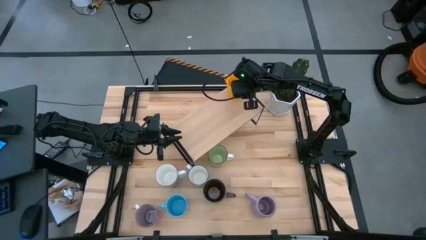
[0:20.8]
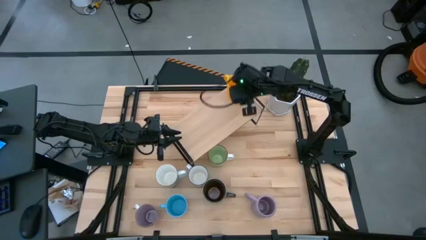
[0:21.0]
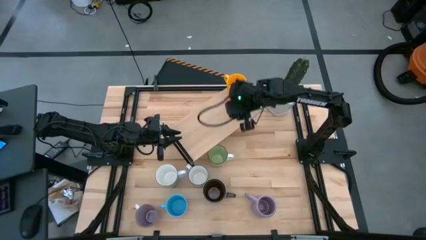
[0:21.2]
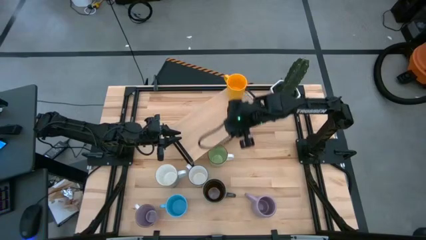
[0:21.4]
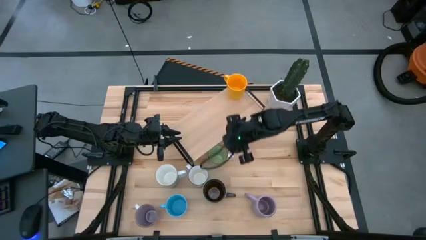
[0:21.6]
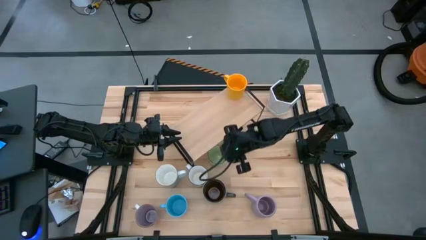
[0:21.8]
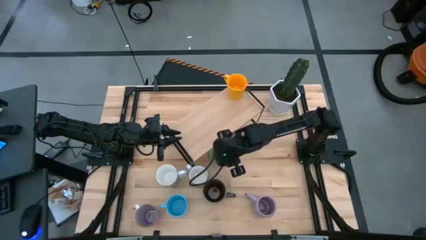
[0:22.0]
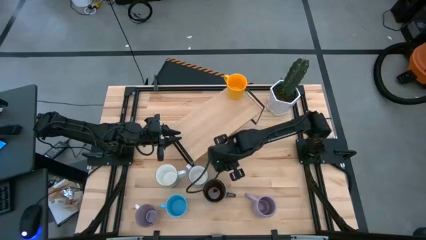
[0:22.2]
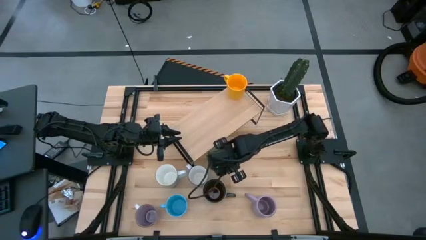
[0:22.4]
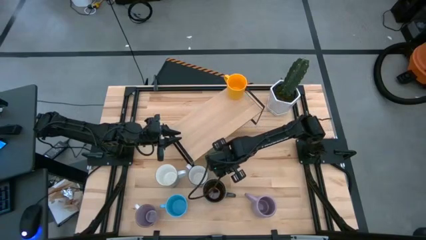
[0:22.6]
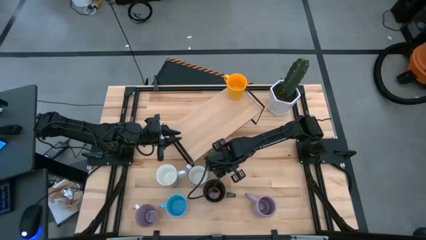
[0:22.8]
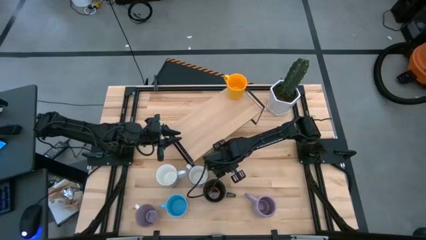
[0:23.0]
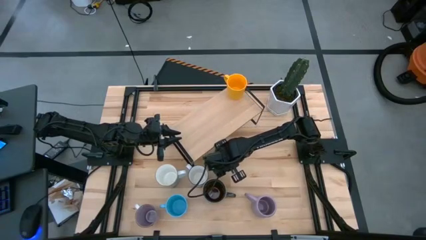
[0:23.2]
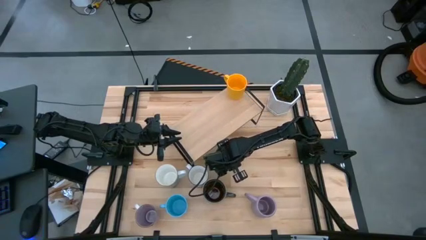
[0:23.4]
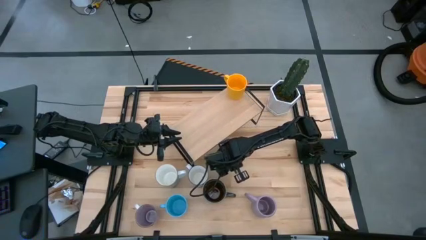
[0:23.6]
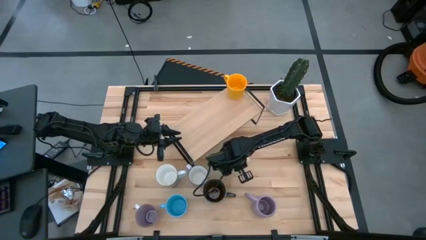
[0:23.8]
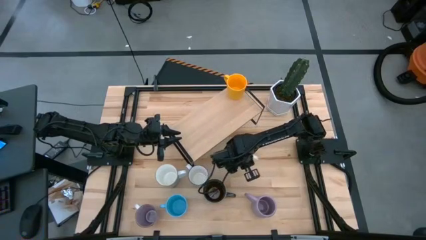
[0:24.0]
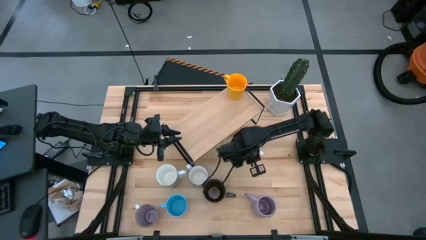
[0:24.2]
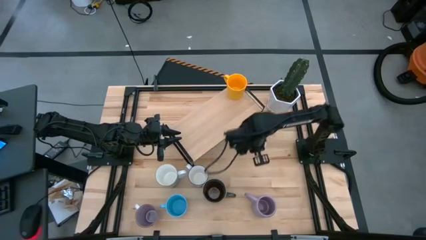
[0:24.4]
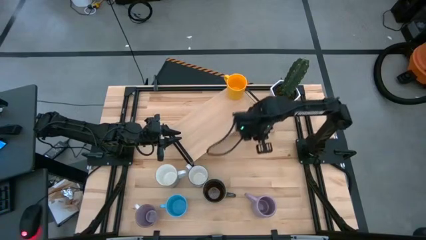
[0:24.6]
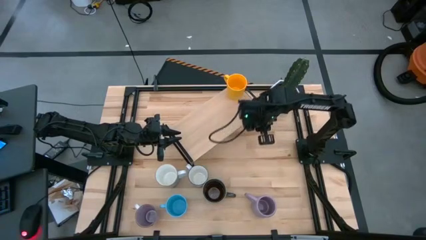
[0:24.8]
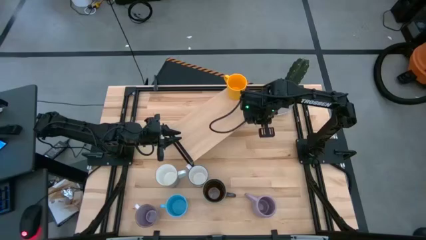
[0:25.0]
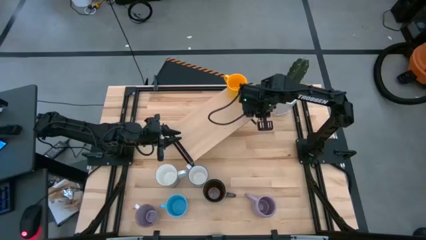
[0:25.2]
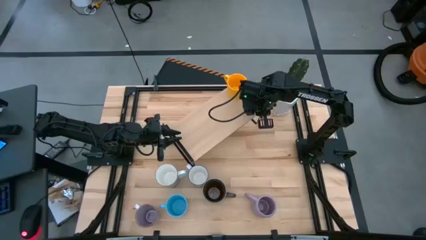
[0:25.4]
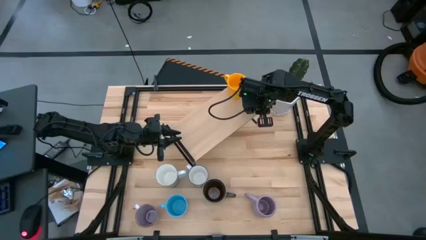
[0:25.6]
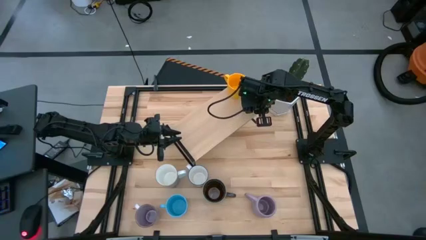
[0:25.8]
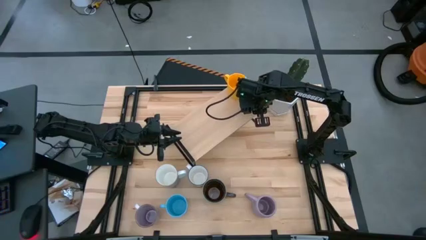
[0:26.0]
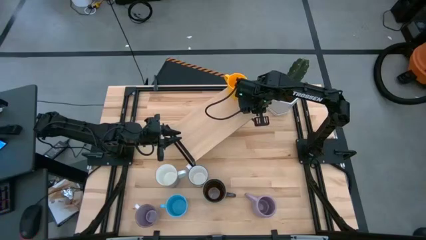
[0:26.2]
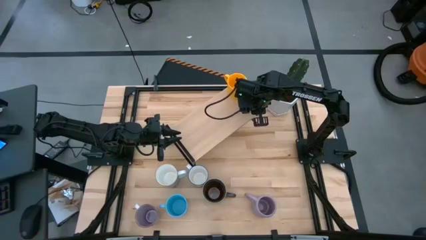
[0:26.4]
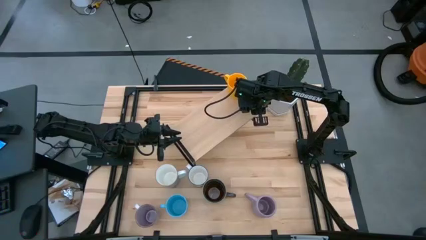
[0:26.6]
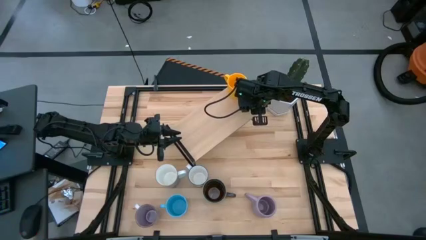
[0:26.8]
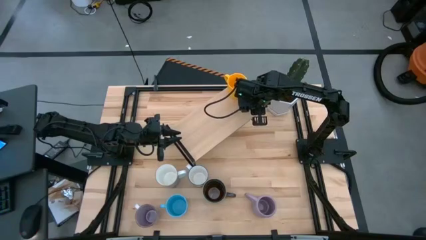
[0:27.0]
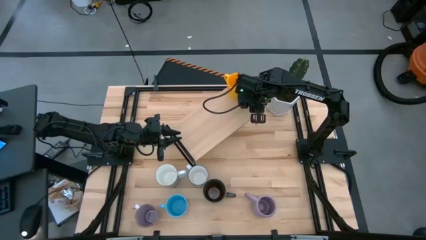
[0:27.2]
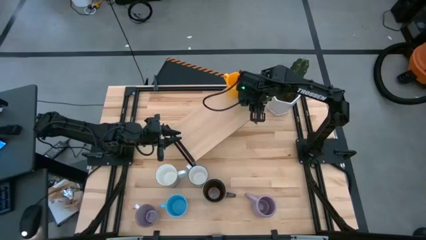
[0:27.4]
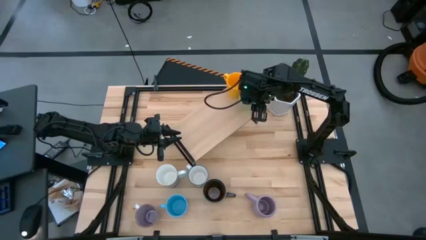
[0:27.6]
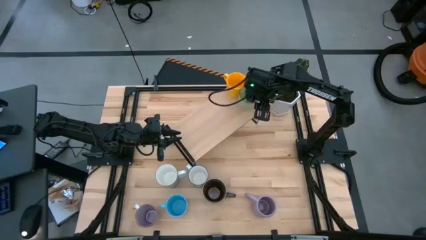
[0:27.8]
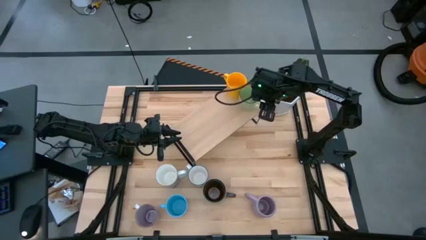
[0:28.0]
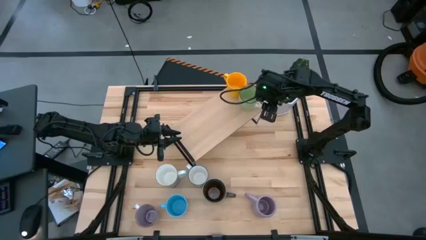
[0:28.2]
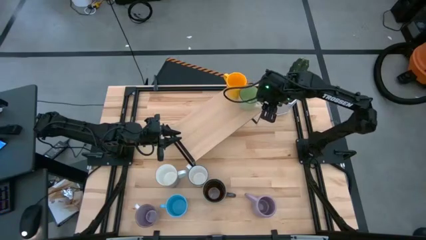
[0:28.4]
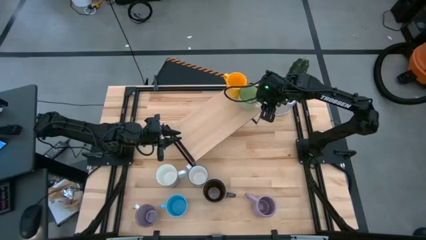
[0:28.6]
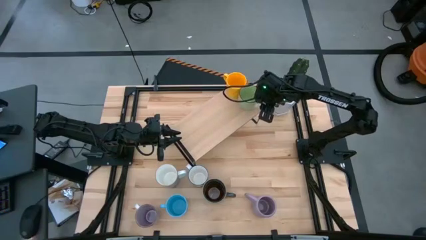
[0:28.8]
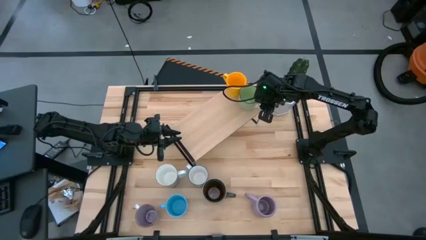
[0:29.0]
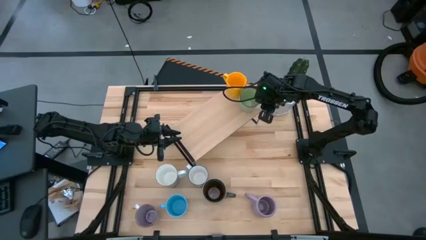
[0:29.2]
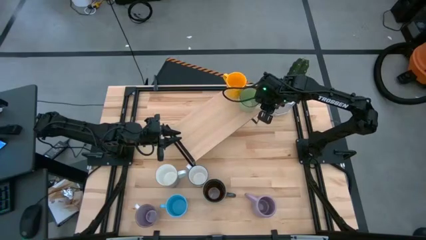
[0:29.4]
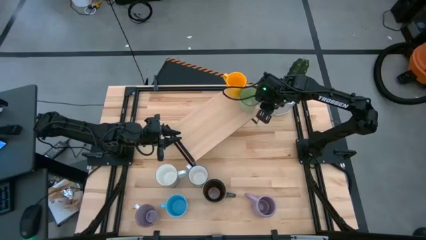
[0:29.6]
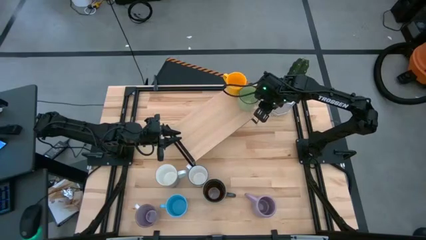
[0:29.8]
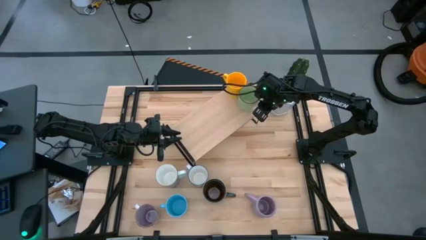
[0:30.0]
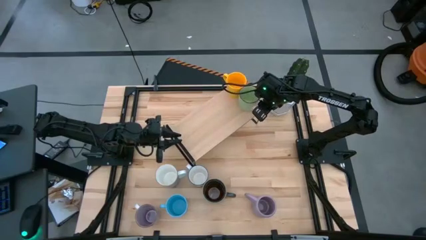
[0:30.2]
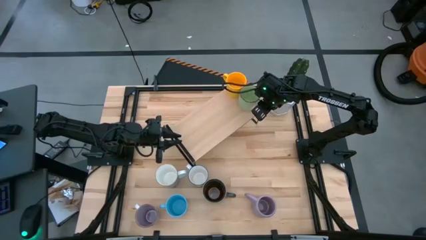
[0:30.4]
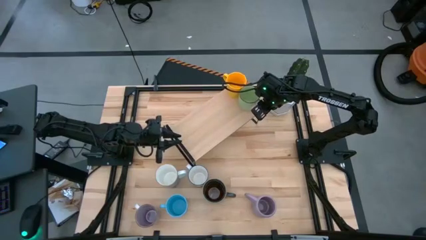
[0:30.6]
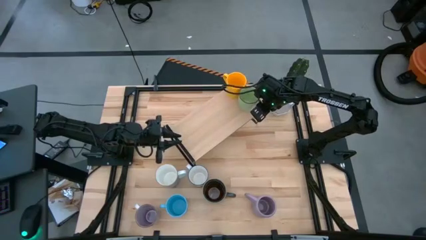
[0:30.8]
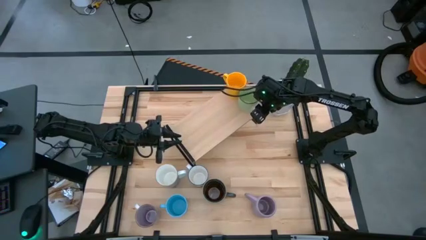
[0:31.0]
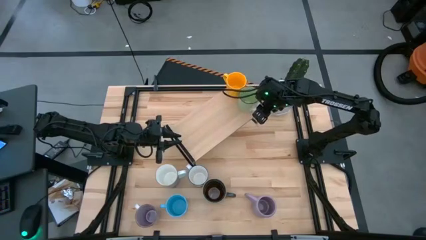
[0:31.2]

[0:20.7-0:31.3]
Task: Place coffee mugs
Put the green mug on the shelf

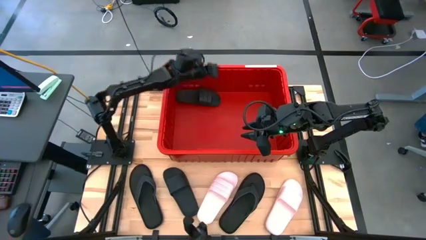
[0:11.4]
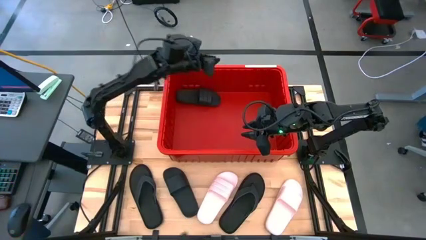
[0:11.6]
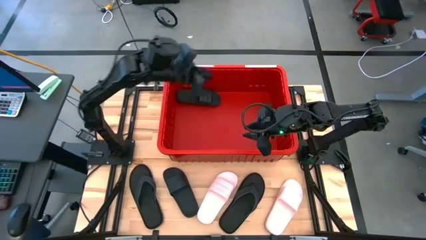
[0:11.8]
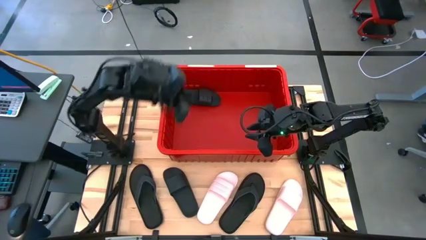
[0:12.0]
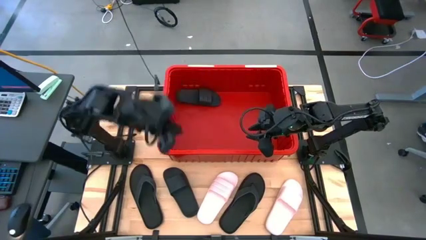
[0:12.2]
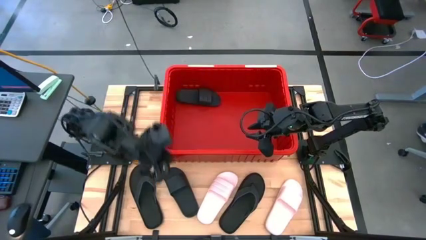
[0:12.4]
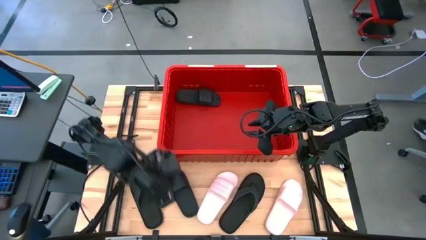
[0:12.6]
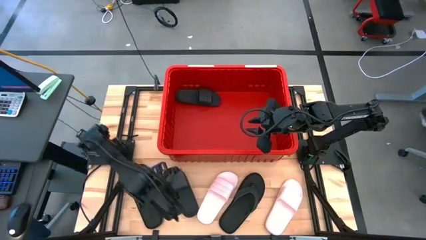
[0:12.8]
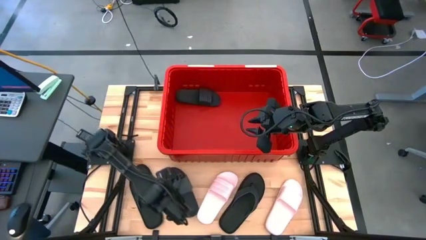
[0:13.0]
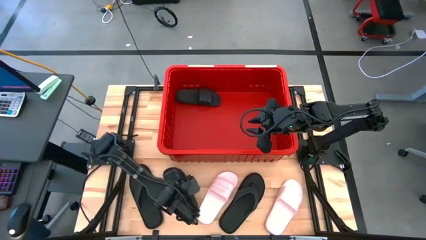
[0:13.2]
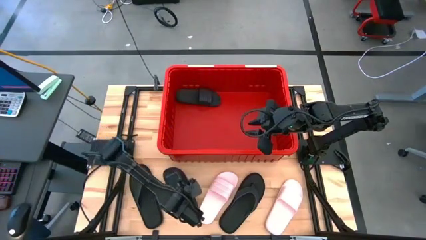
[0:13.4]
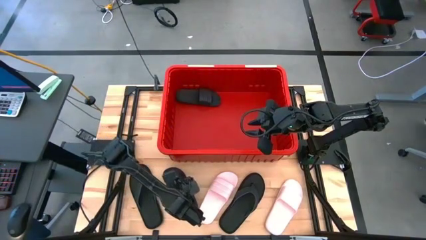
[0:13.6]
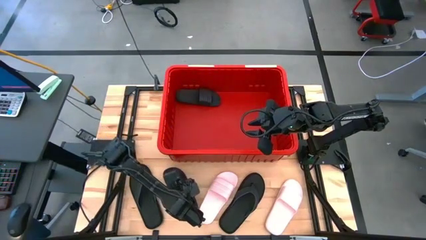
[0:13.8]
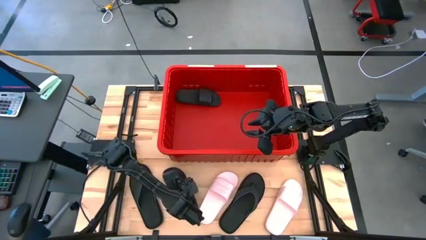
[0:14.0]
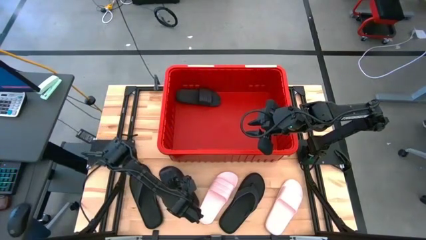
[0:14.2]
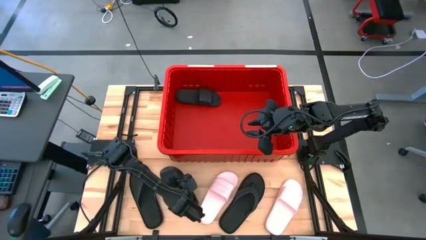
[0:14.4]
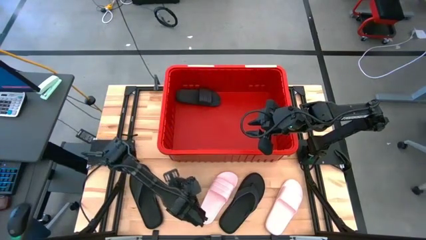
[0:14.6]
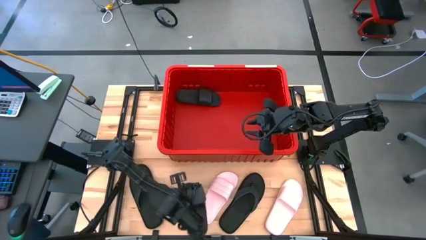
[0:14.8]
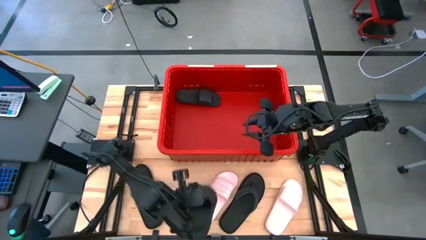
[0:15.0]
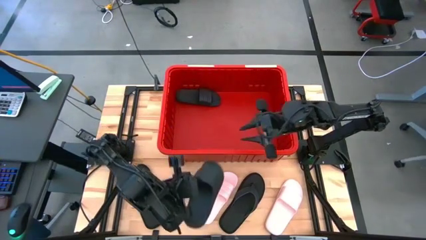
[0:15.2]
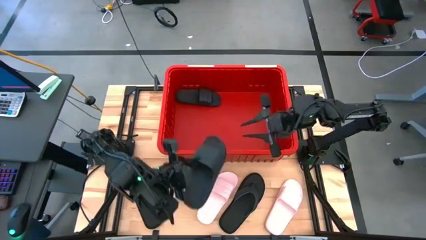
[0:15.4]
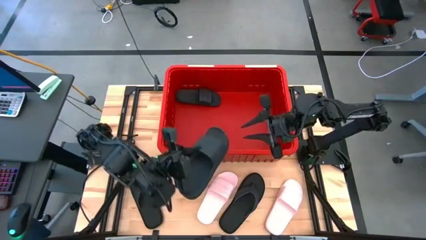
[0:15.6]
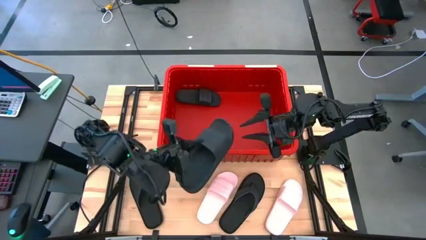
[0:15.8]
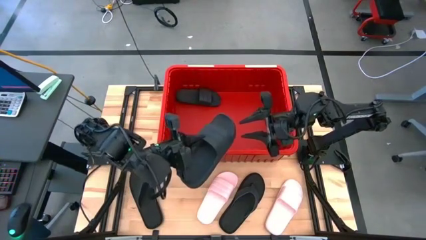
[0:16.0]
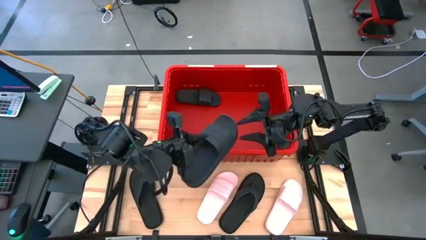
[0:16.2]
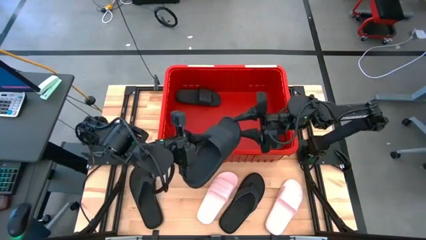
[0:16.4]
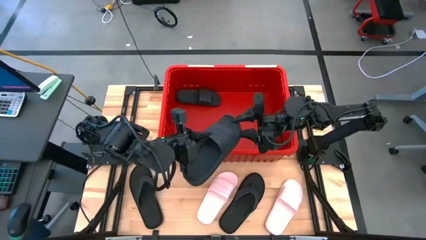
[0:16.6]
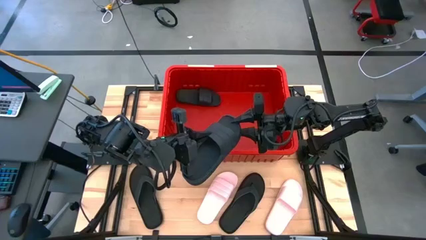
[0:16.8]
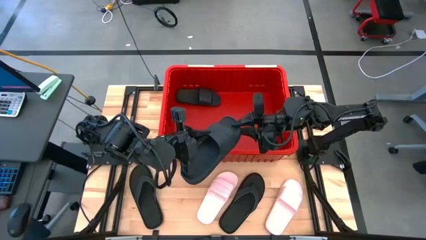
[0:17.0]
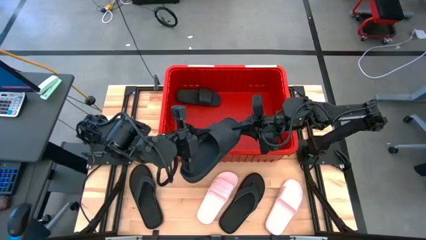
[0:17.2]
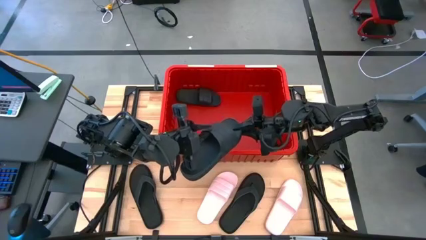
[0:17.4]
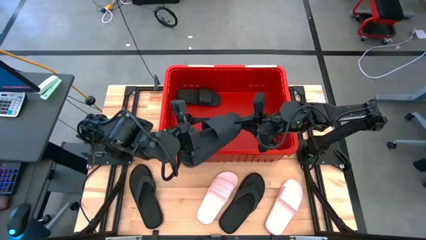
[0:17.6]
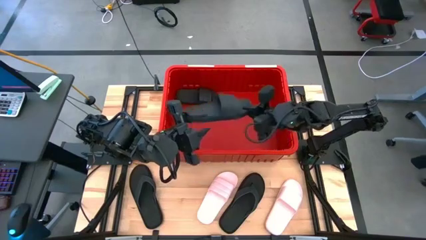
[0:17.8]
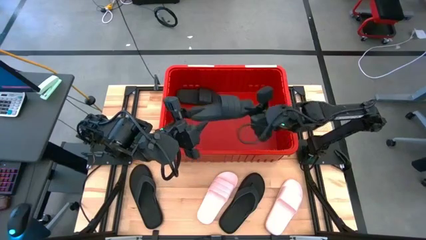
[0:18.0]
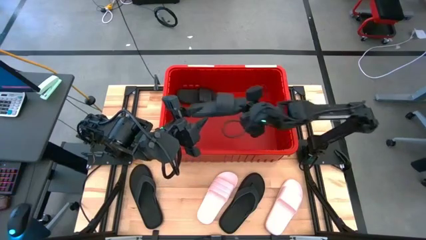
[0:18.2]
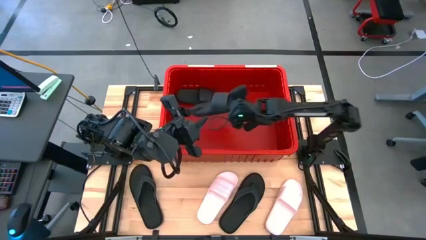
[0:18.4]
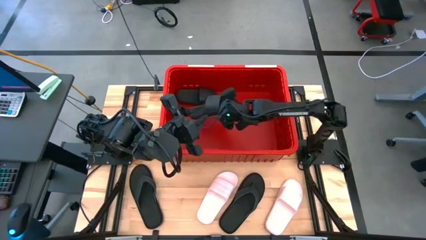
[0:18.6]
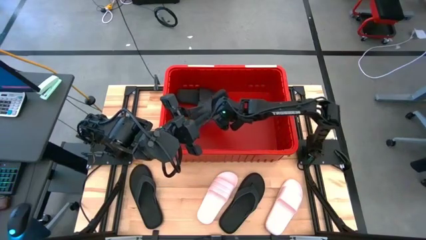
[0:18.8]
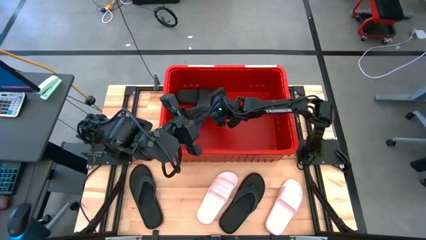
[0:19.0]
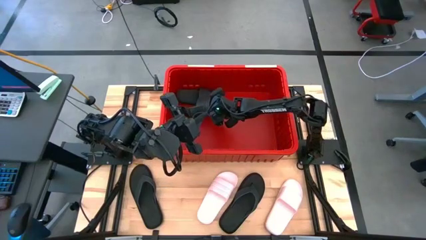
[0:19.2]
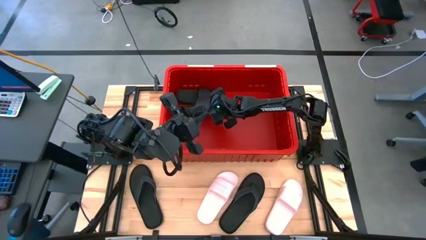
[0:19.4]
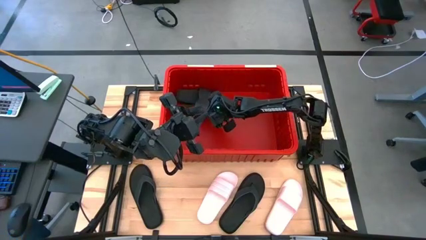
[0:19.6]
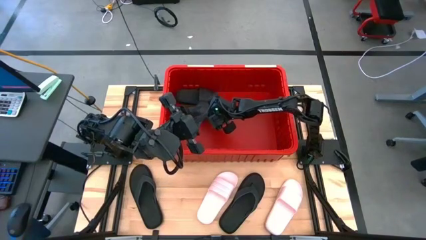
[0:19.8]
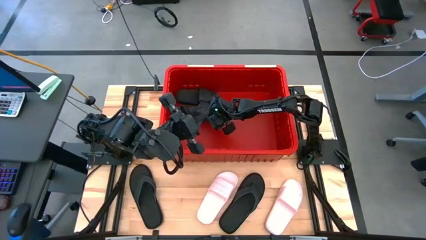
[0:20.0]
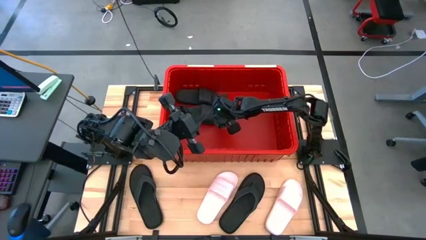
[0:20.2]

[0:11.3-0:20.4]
Task: Pick and place slides into bin
Put the black slide into the red bin and align it with the other black slide
